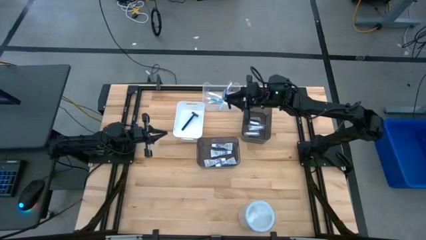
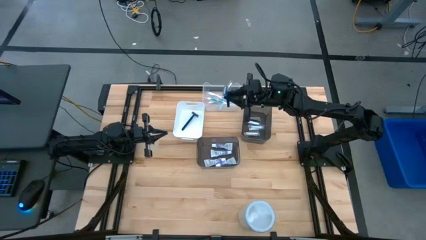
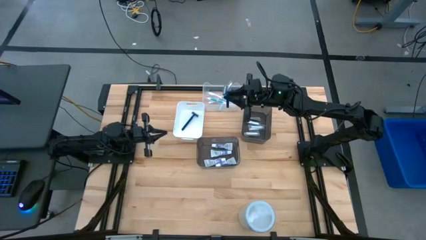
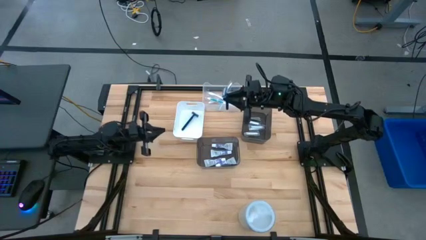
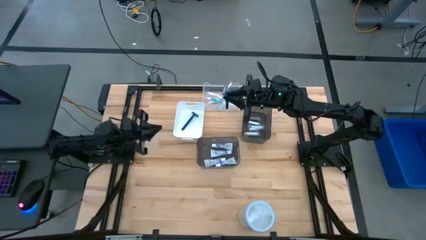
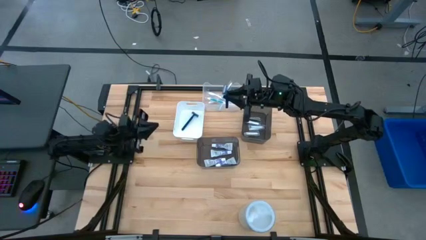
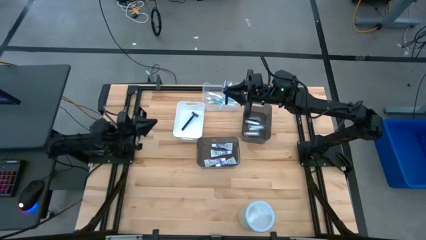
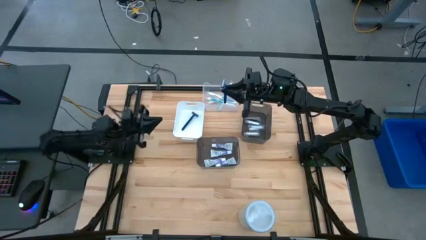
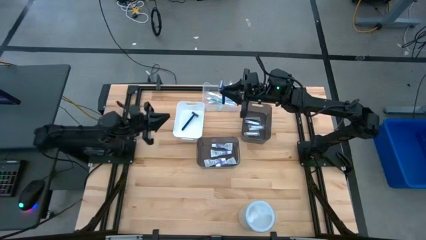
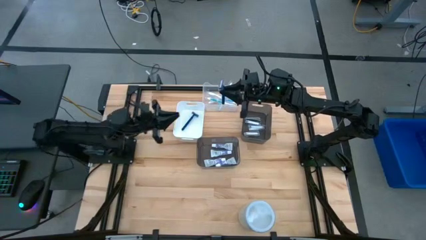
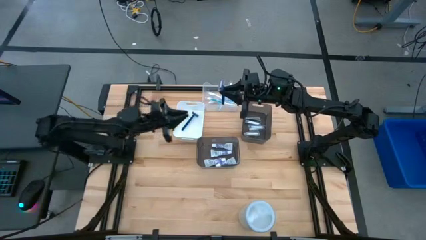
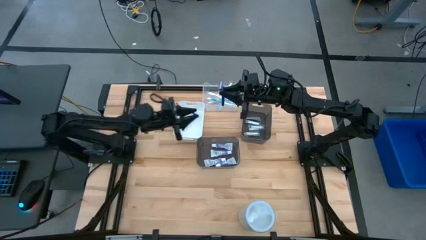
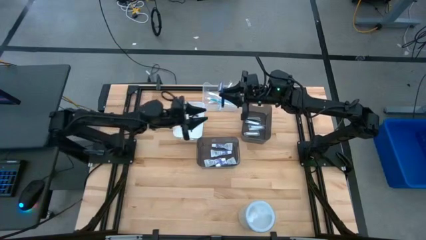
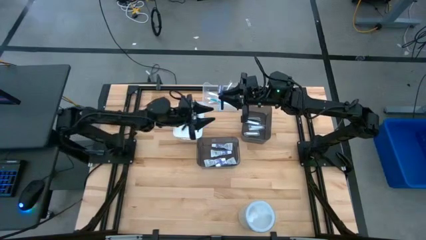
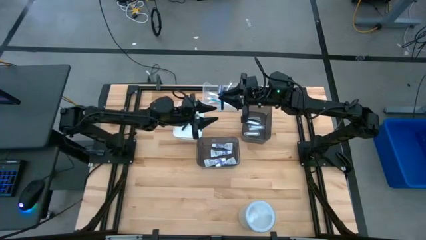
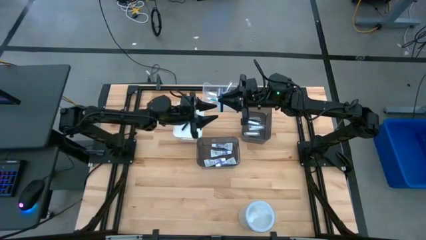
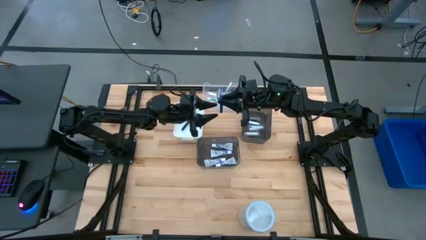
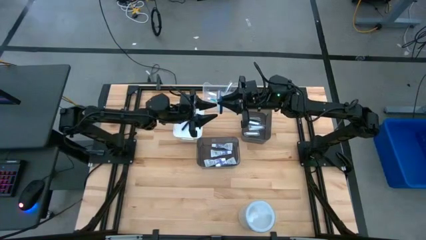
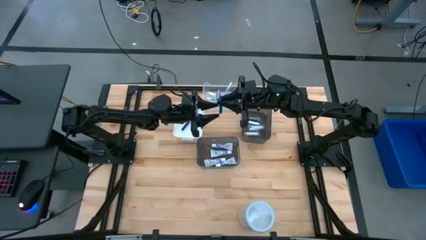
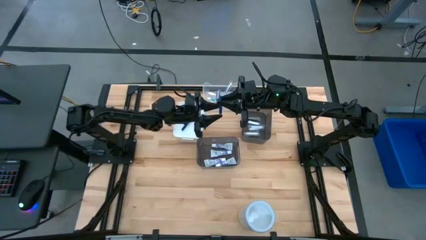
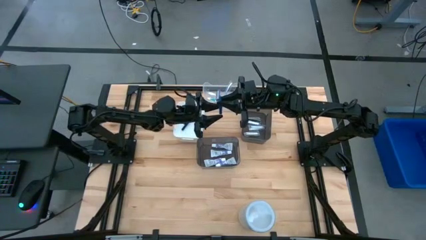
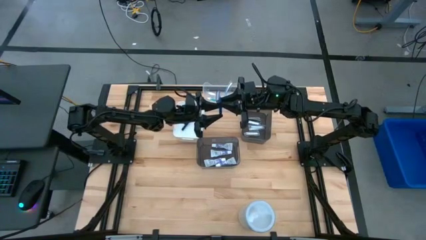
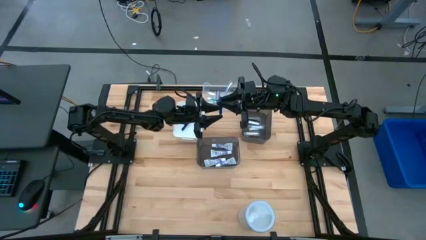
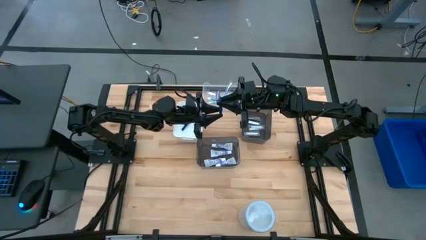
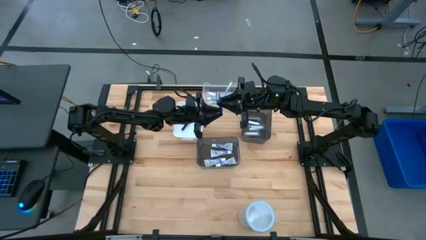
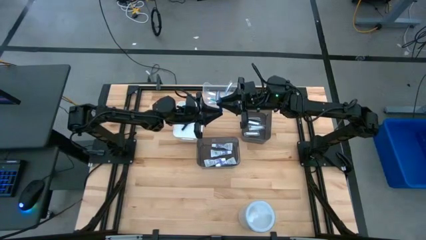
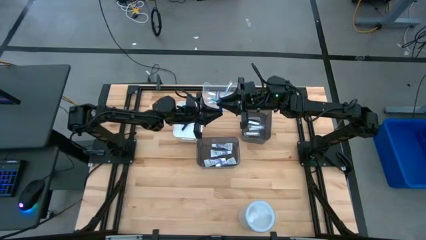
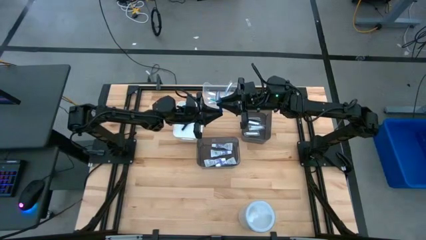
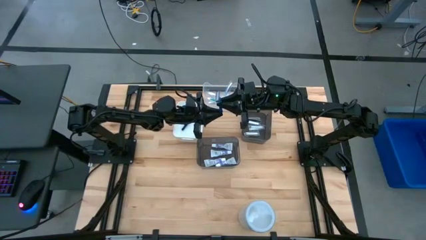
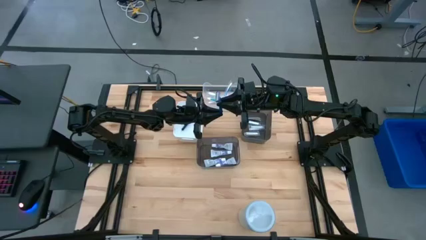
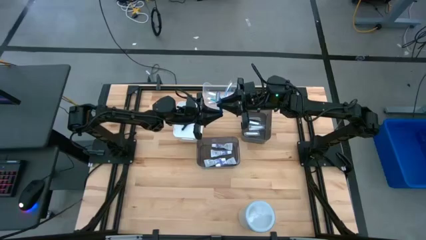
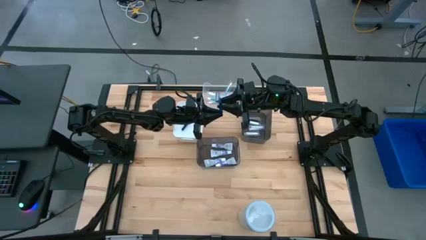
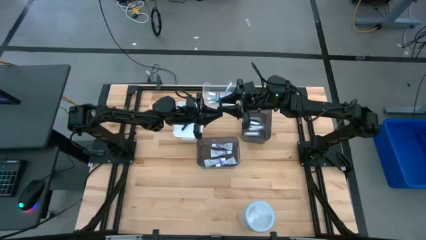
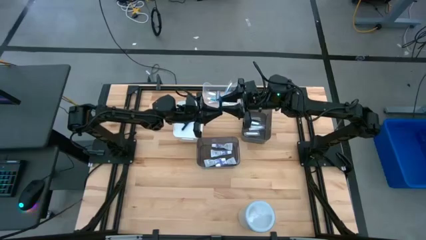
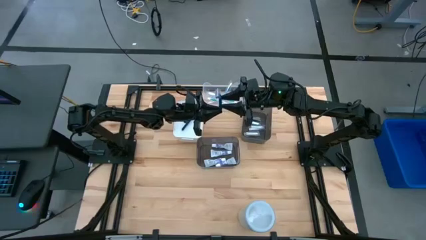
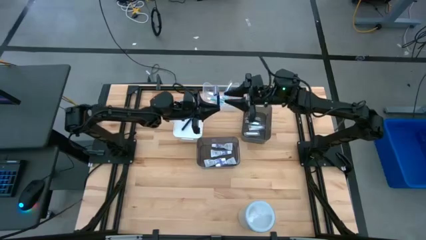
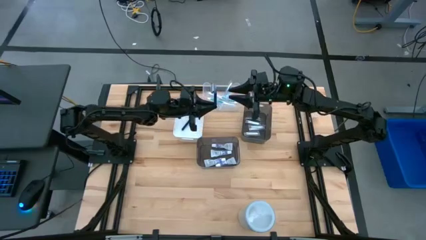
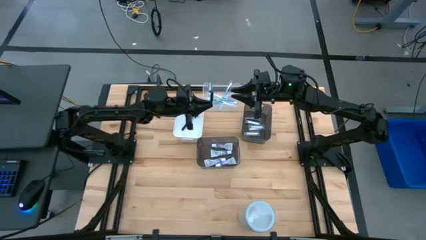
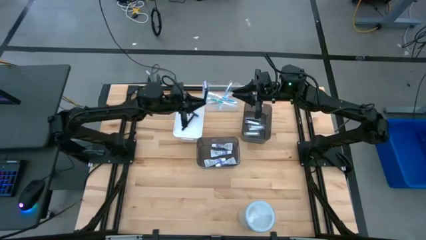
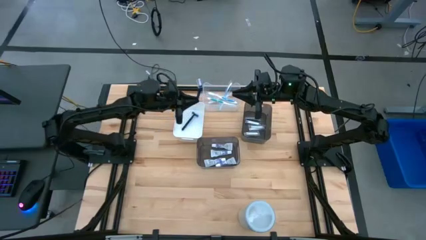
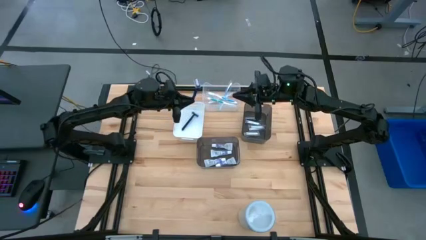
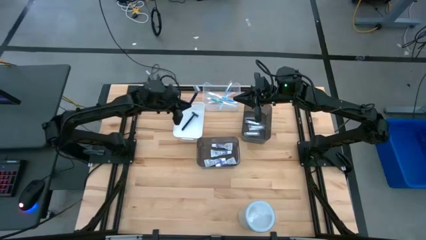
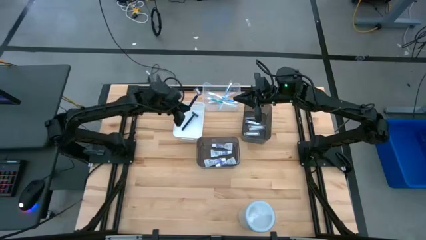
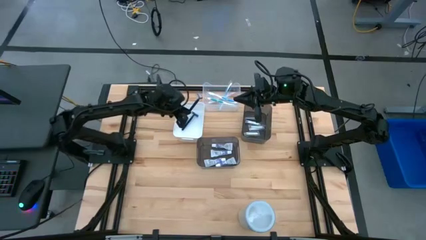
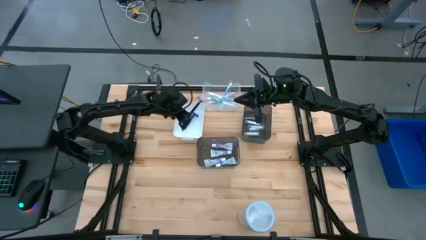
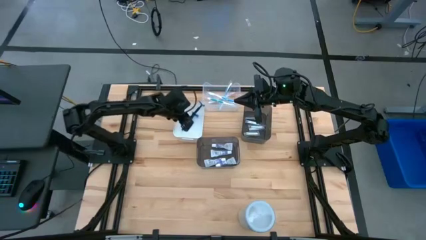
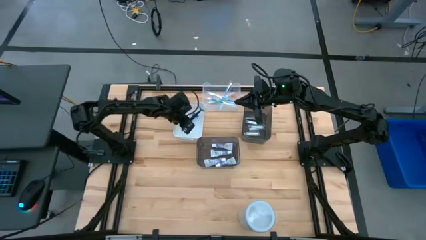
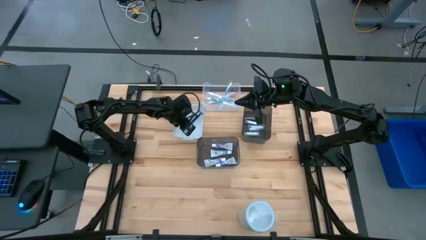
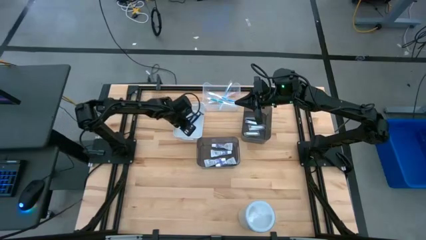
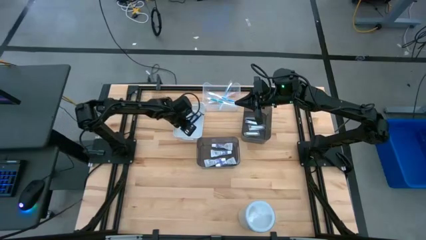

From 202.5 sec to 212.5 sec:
Task: Pick & Place Travel size toiletries
Put the blue razor into the white bin
